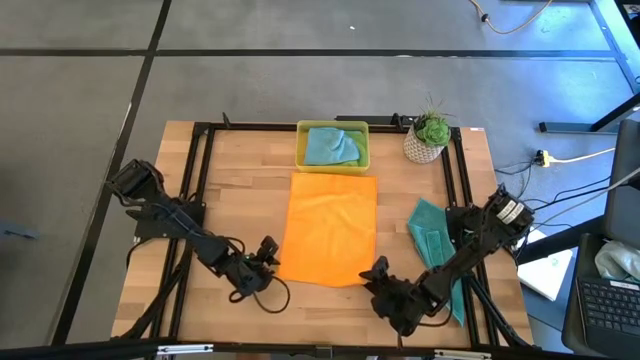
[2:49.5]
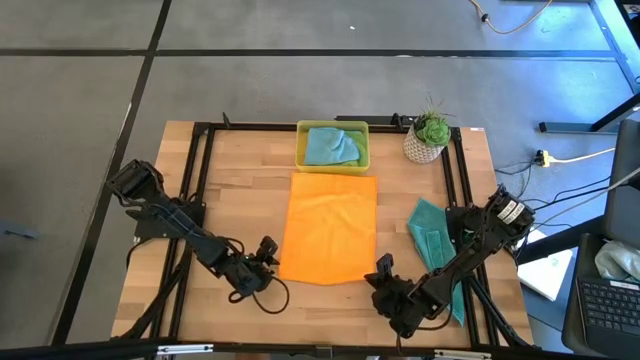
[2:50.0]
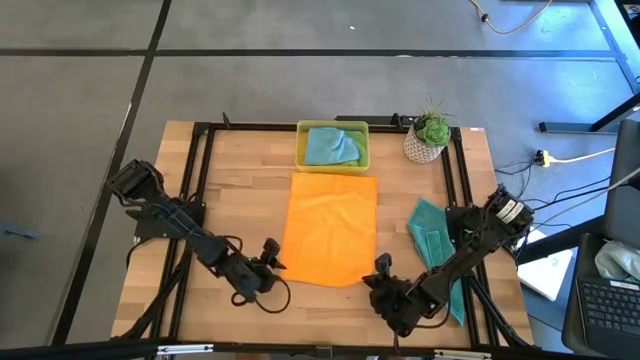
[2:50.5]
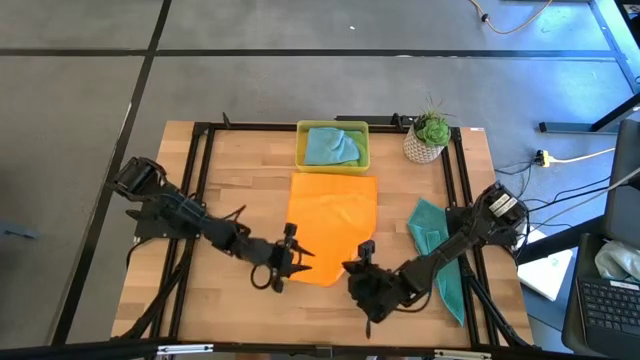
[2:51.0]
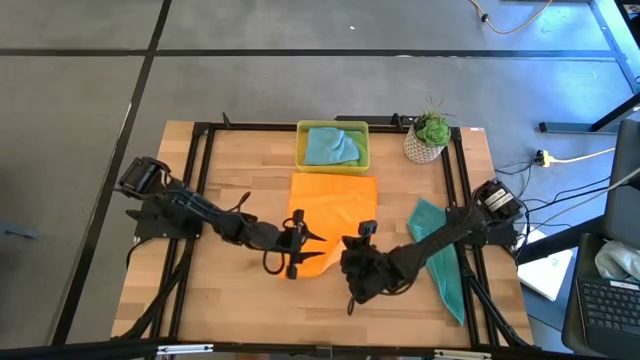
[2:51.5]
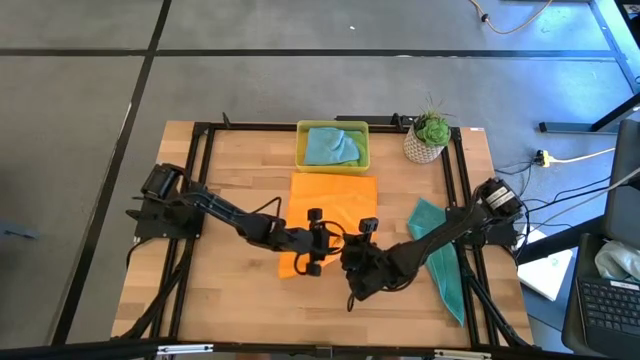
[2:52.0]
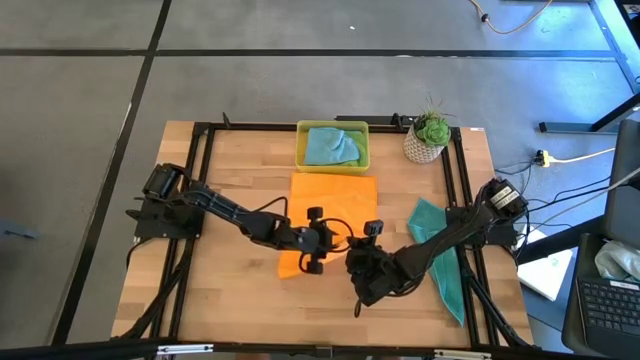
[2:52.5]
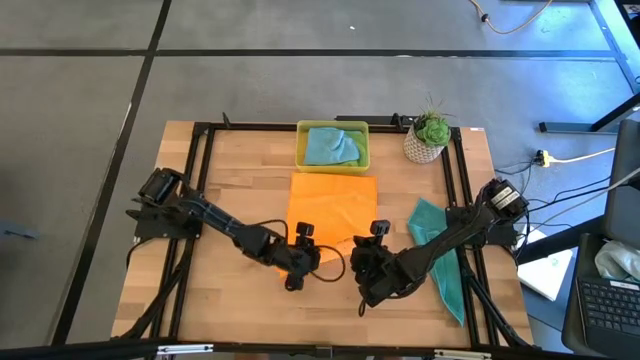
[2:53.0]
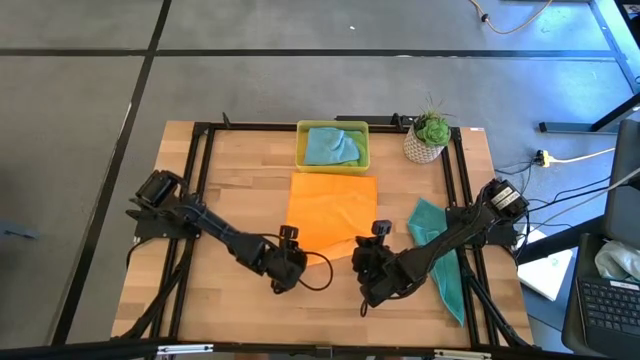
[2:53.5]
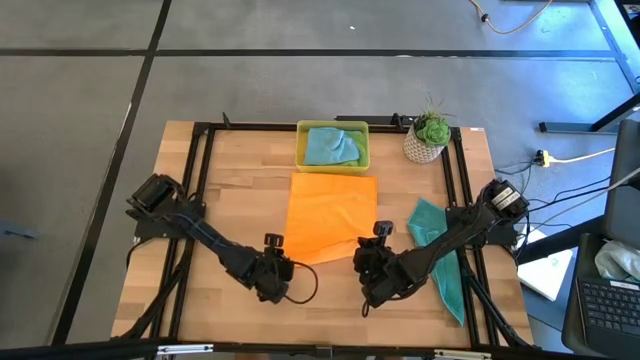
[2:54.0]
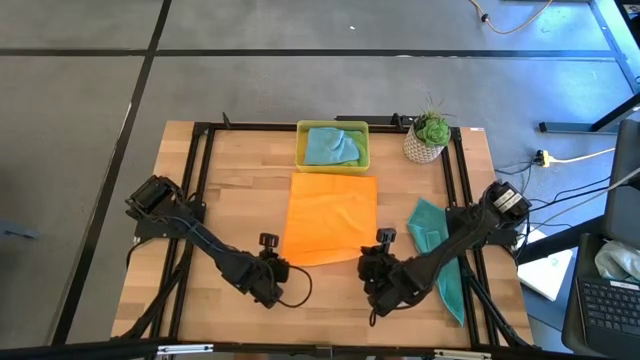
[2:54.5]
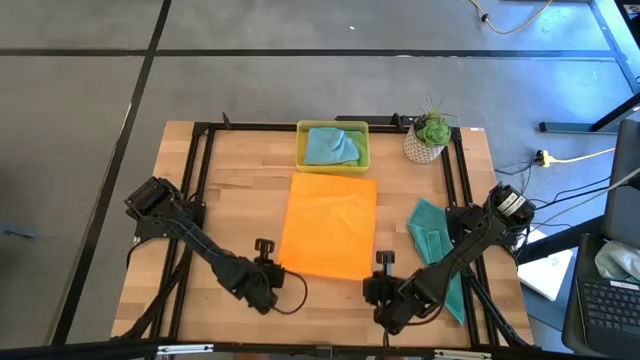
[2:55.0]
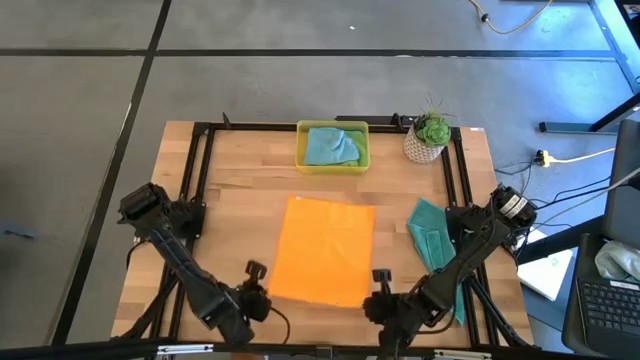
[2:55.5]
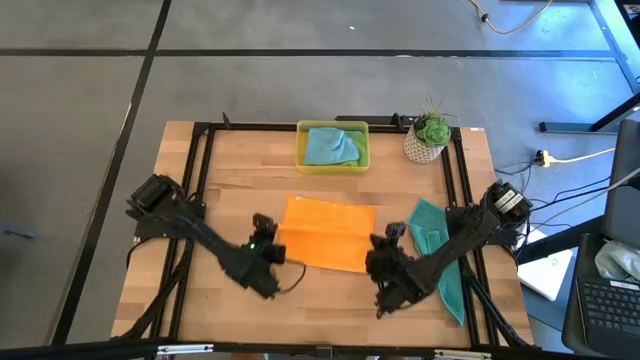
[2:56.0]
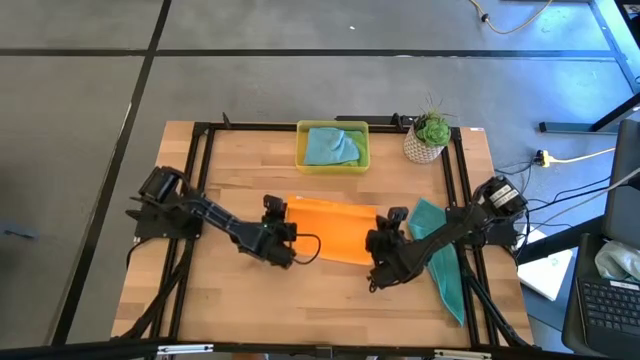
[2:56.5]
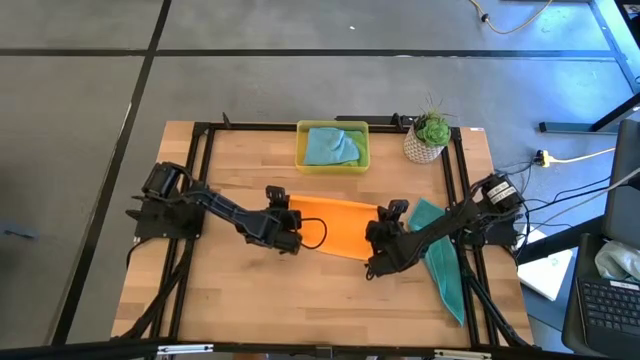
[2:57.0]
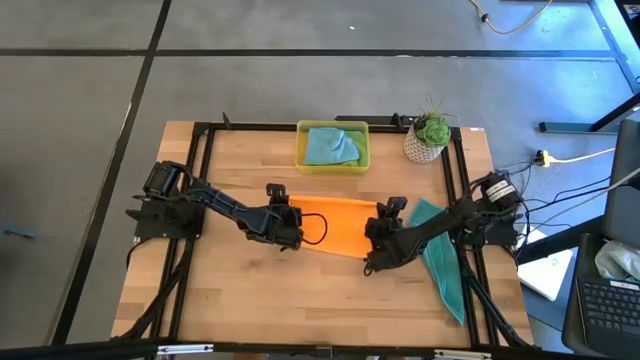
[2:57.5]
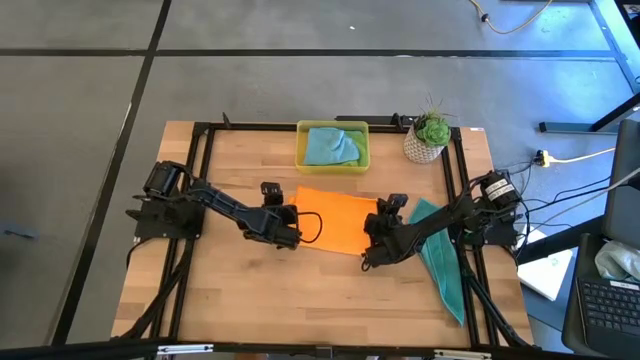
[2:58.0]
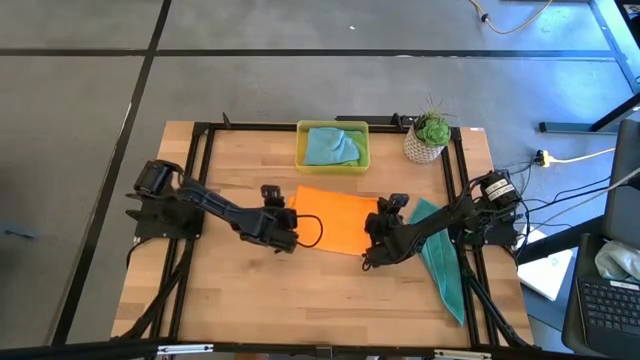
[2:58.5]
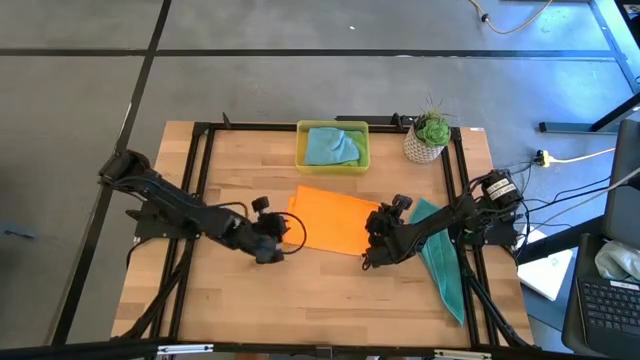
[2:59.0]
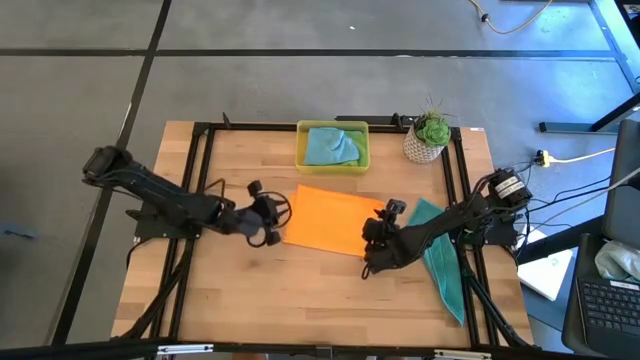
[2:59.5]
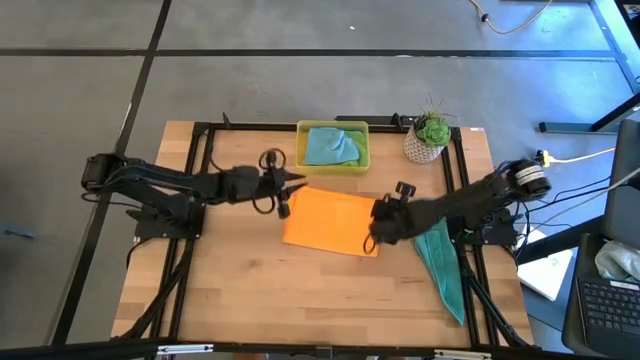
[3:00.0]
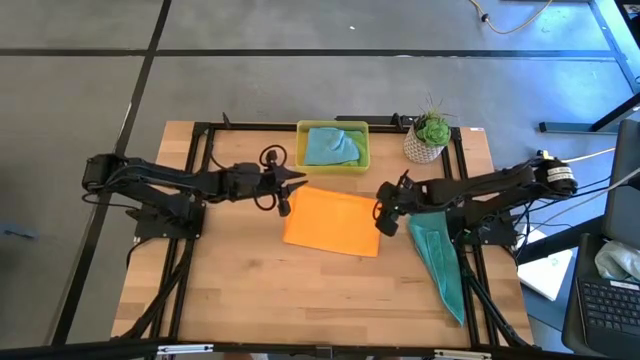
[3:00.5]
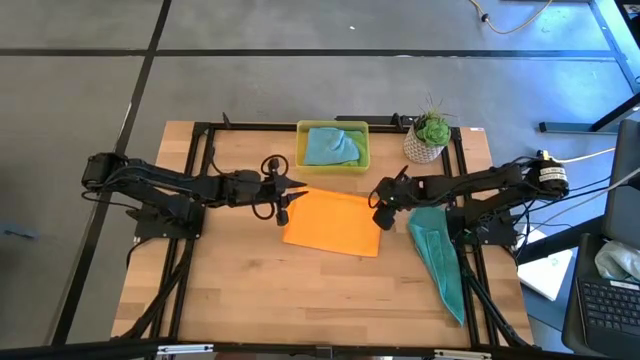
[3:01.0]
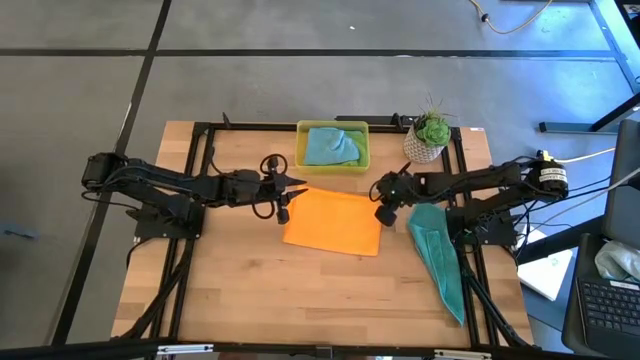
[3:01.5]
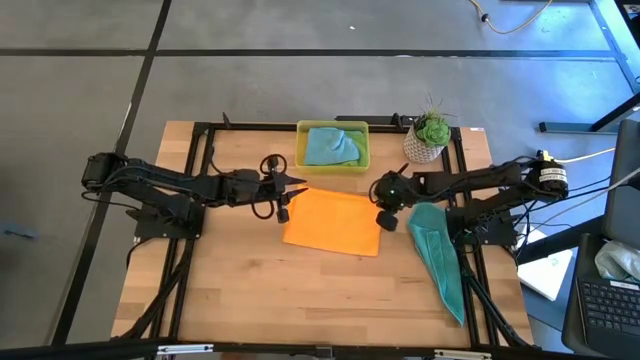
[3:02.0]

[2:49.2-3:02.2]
Task: Fold microfiber towels
Fold the orange cloth

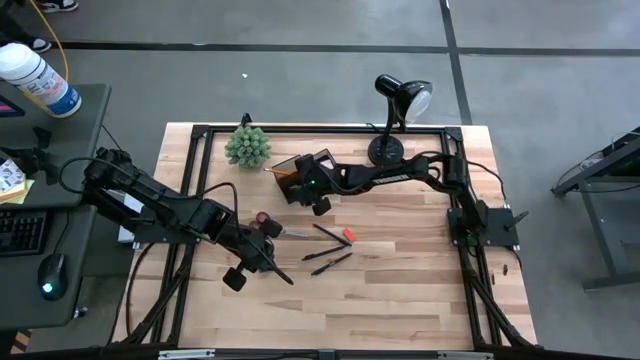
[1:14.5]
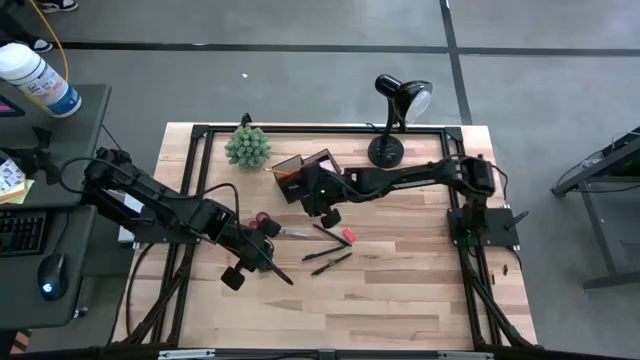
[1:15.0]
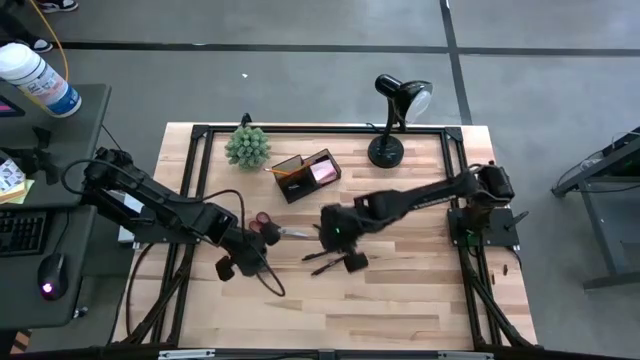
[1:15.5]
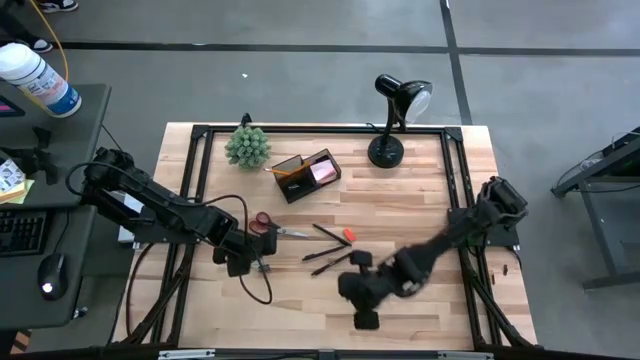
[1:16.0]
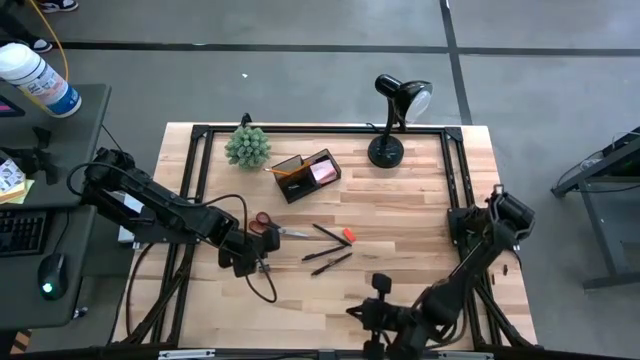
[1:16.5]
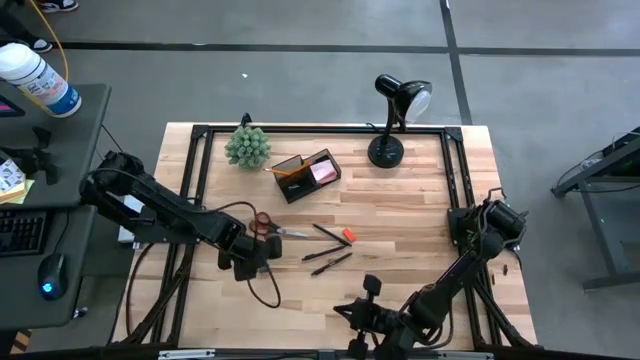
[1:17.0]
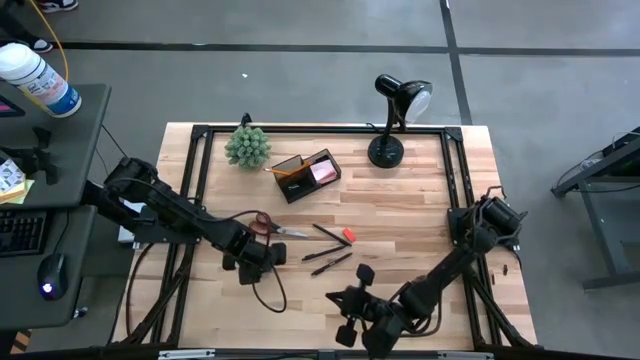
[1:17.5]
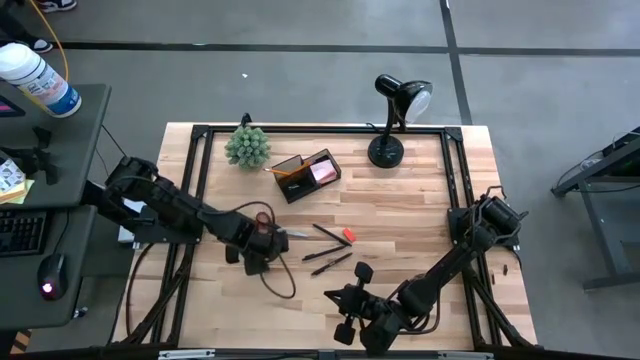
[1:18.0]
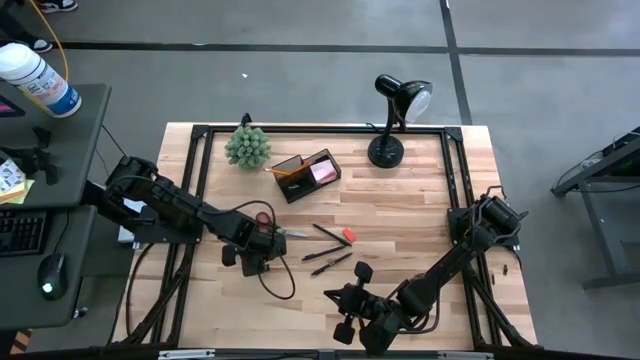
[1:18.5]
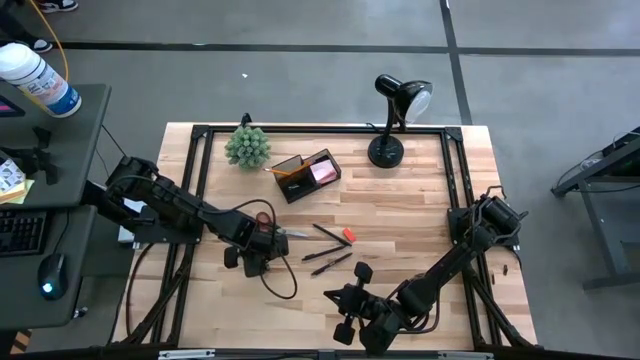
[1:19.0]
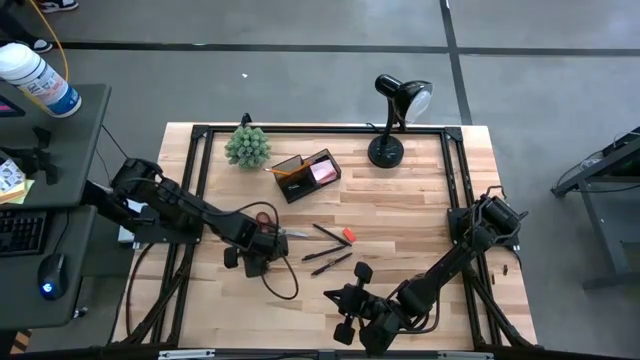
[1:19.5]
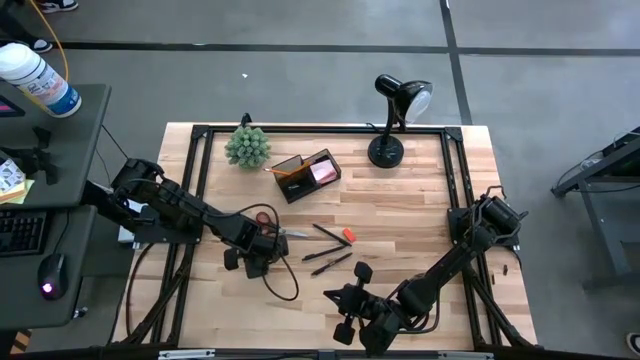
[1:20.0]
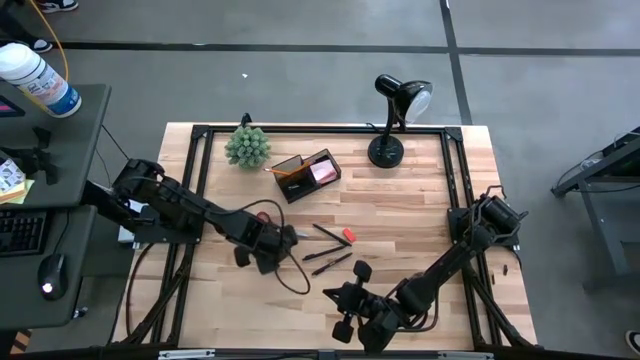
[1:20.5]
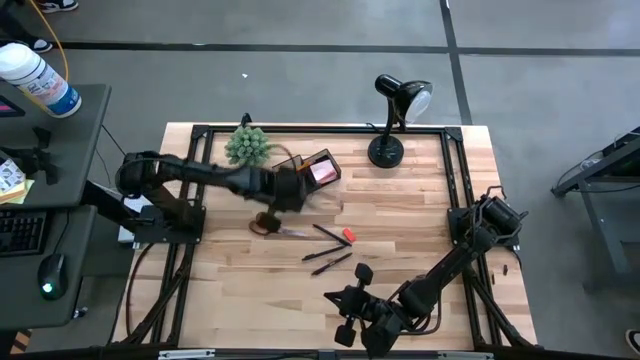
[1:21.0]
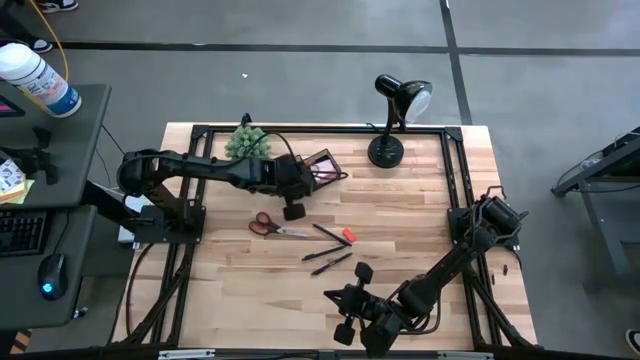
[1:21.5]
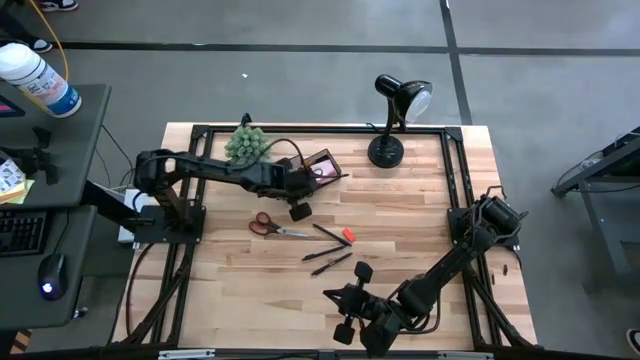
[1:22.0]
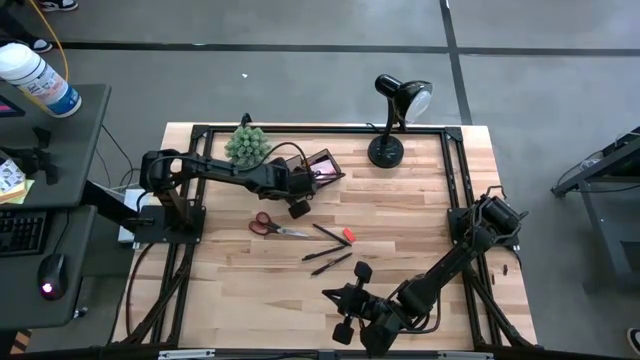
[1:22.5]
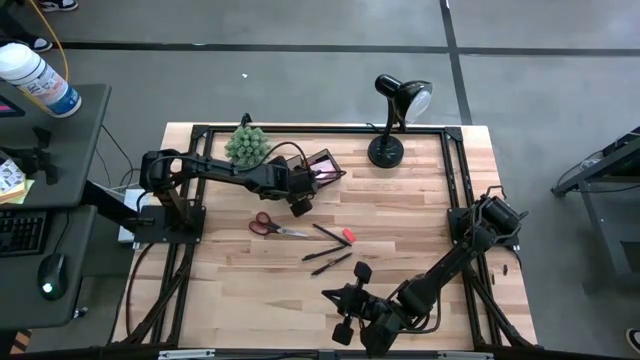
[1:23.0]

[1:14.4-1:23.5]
Task: Pick and place office supplies into organizer
Put the black binder clip into the black desk organizer
